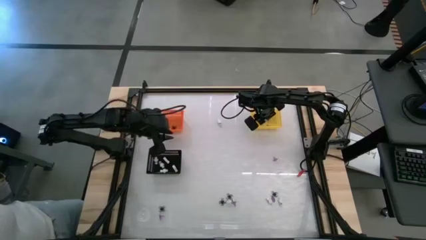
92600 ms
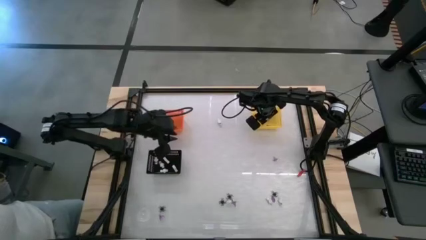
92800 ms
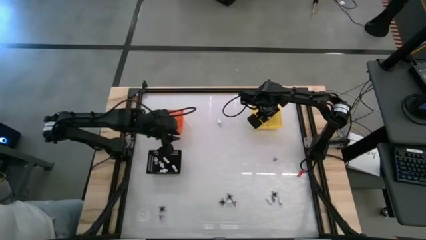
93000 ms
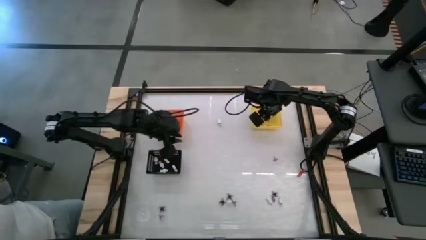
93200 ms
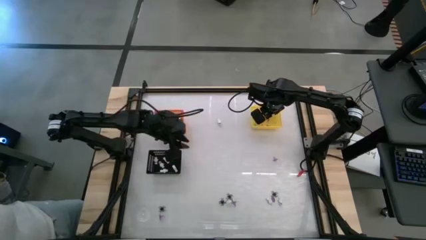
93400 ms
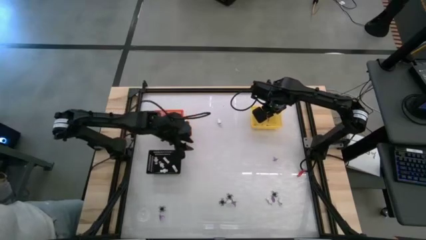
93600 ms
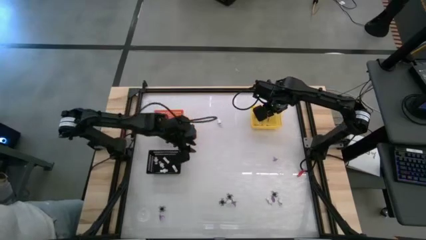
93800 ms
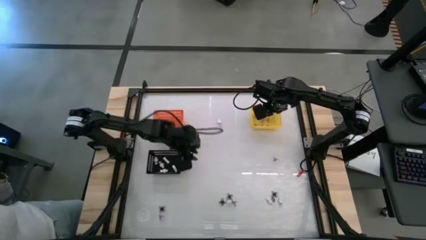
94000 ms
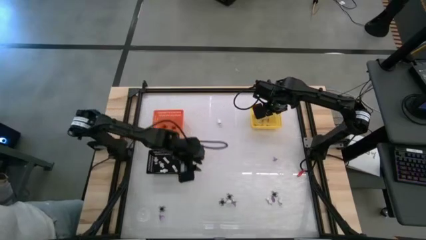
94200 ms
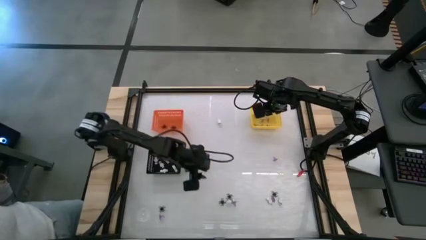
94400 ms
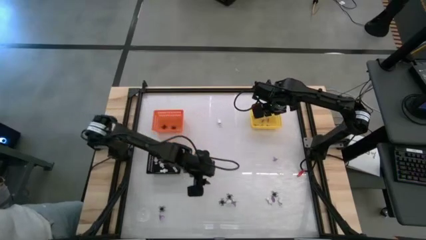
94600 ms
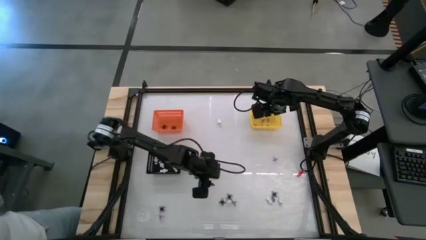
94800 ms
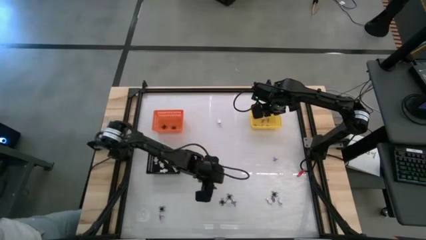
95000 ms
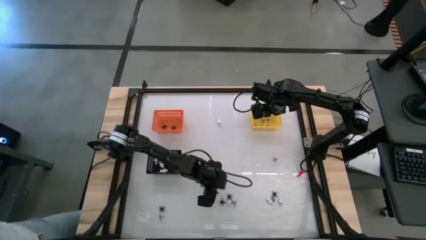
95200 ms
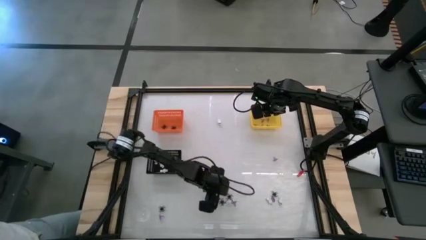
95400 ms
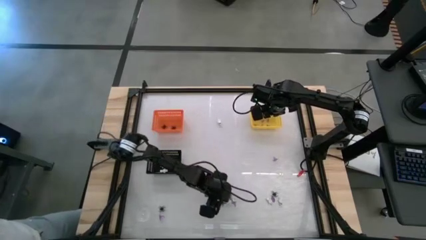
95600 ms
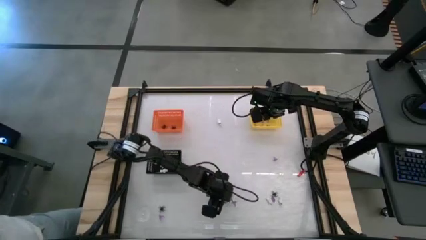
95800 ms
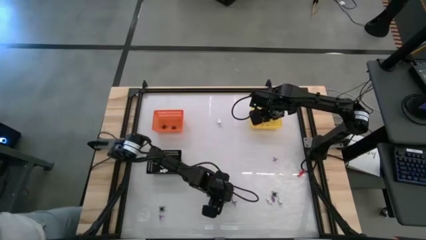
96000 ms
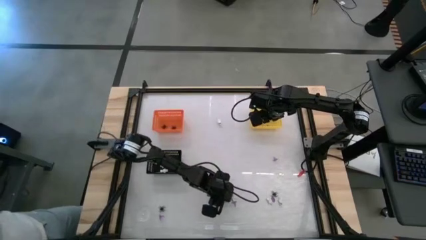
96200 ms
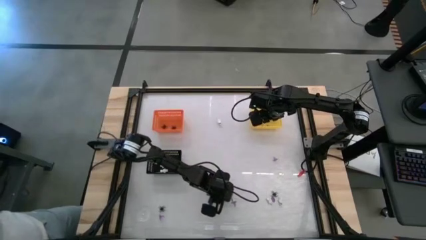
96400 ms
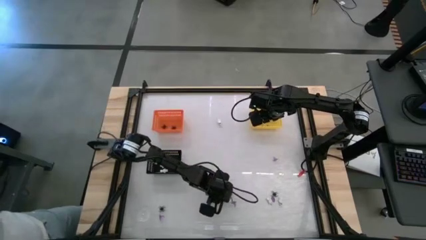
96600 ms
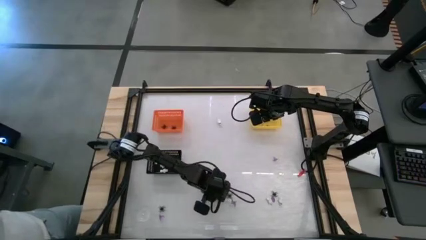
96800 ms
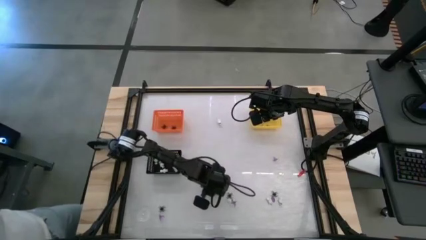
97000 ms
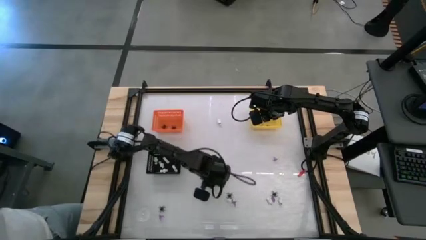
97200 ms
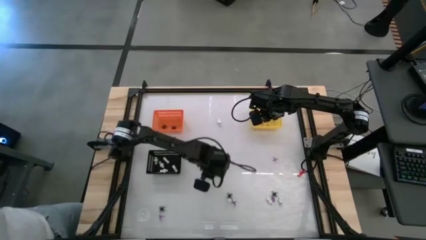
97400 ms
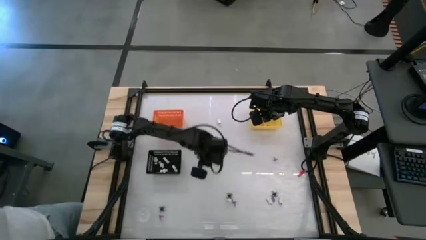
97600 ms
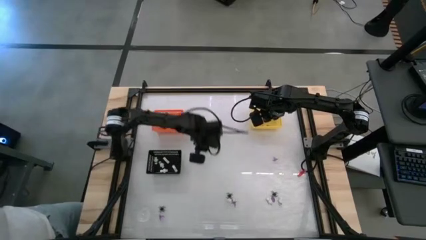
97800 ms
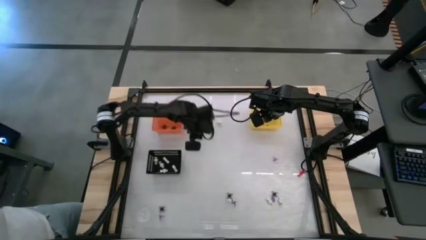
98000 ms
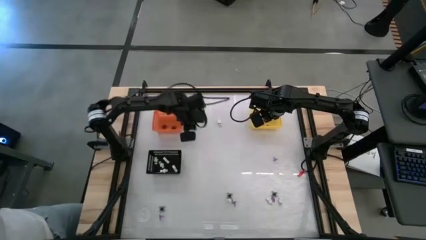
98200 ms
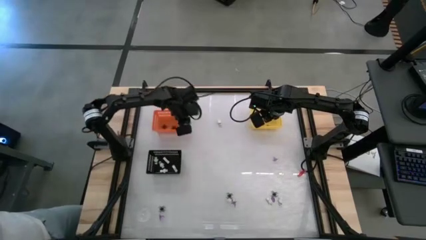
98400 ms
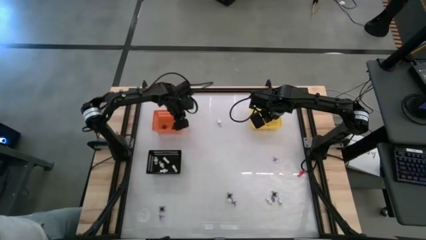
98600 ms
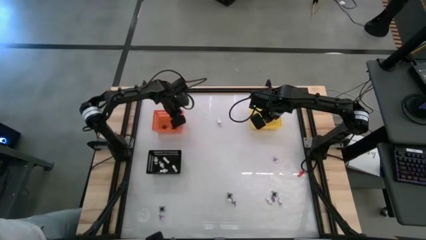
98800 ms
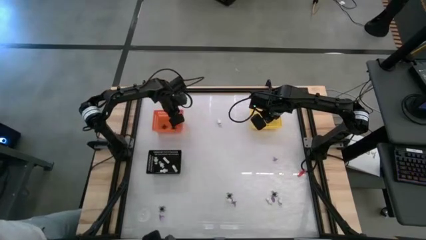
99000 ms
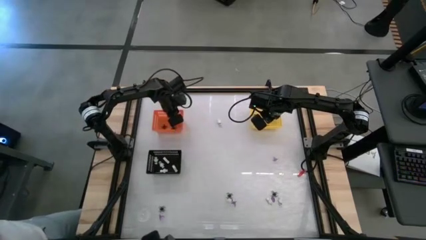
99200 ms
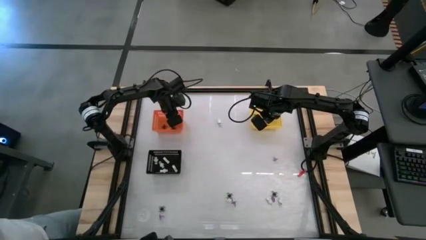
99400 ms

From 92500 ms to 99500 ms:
Task: Sort Halloween decoration
Put the black spider toy into the orange bin

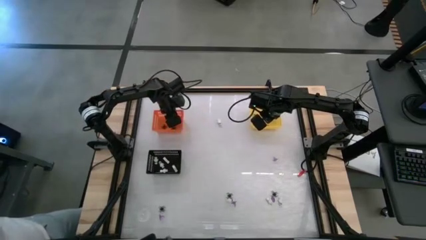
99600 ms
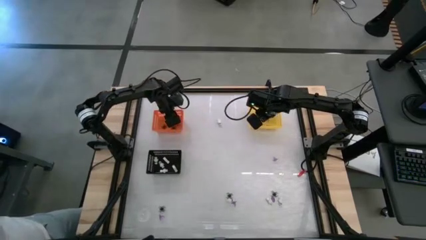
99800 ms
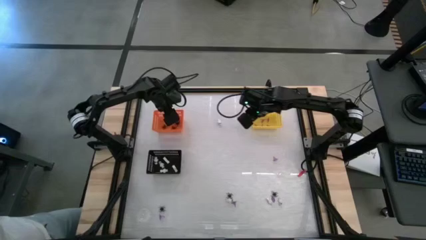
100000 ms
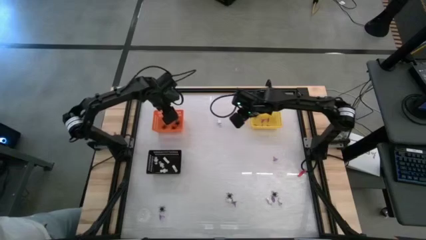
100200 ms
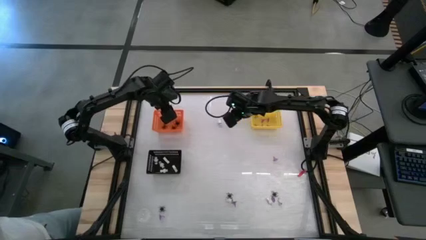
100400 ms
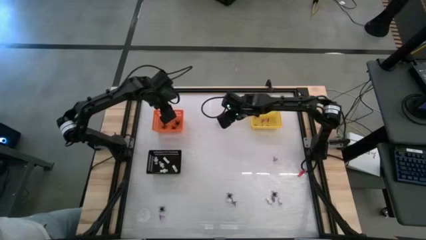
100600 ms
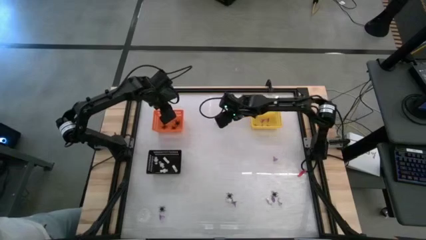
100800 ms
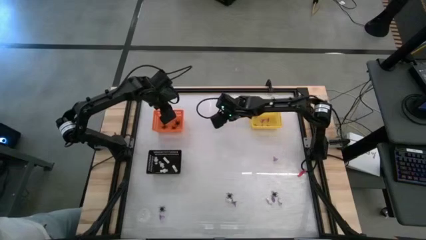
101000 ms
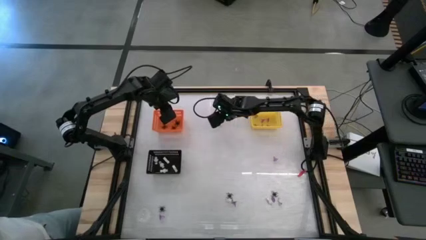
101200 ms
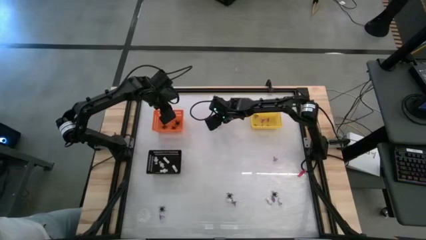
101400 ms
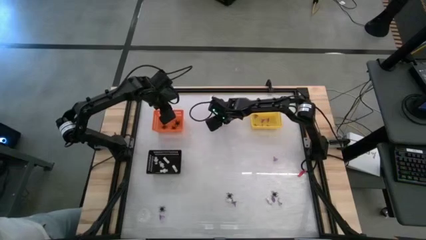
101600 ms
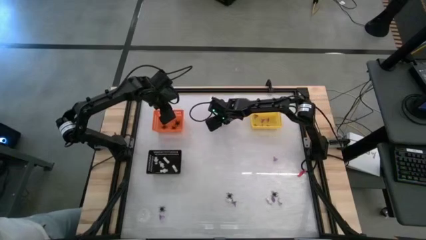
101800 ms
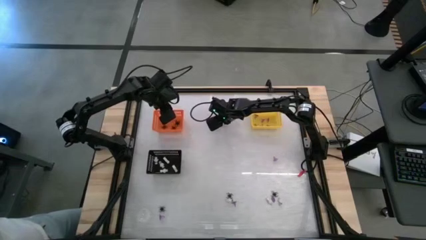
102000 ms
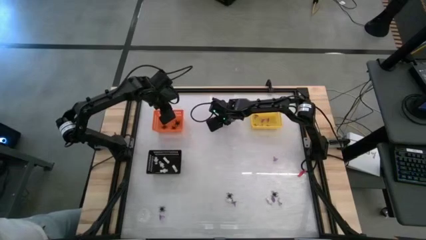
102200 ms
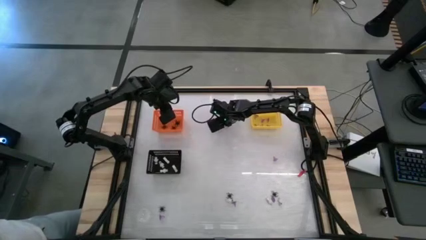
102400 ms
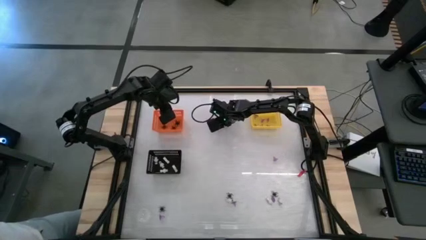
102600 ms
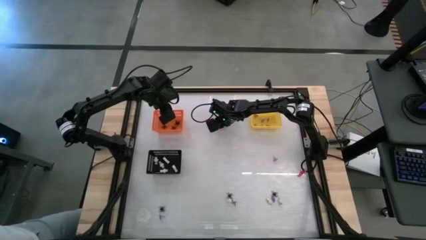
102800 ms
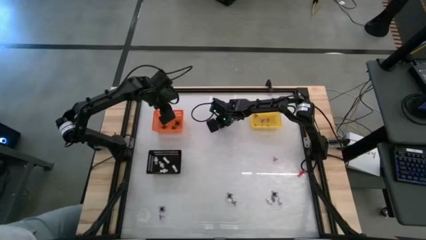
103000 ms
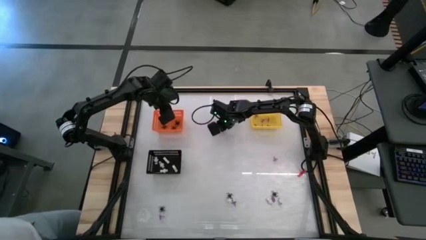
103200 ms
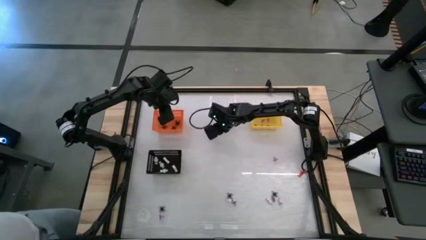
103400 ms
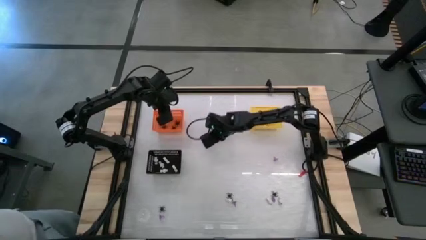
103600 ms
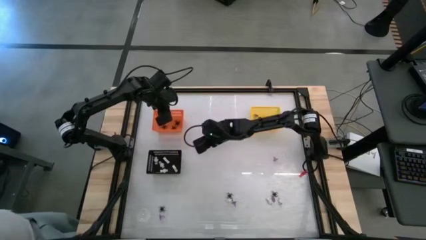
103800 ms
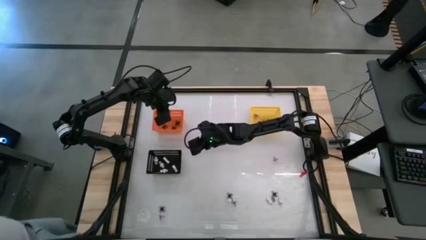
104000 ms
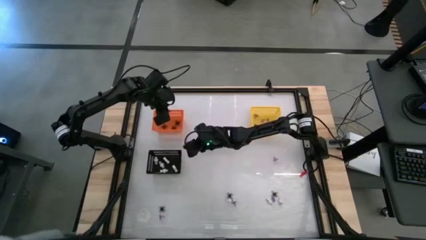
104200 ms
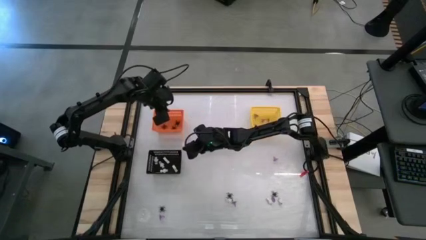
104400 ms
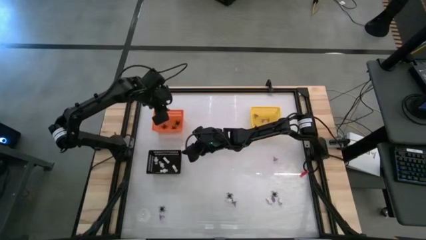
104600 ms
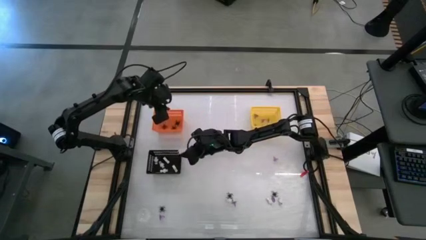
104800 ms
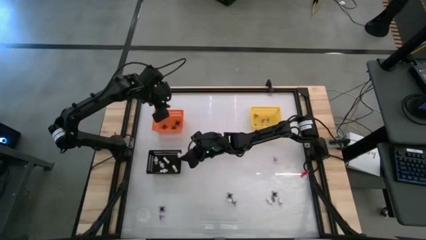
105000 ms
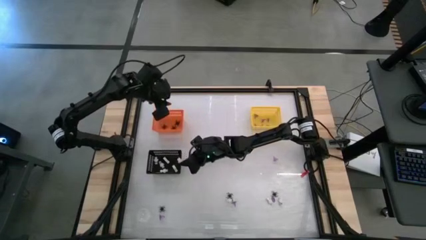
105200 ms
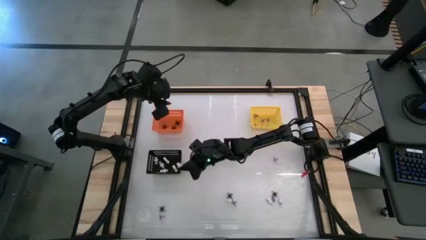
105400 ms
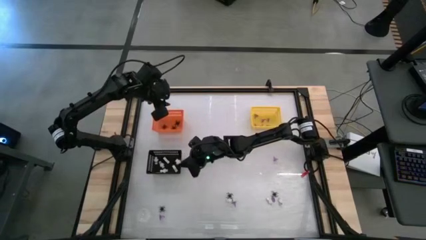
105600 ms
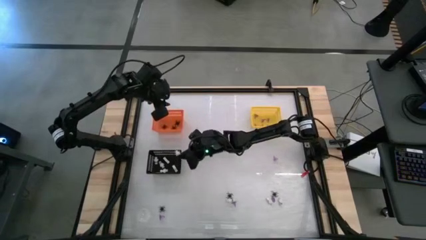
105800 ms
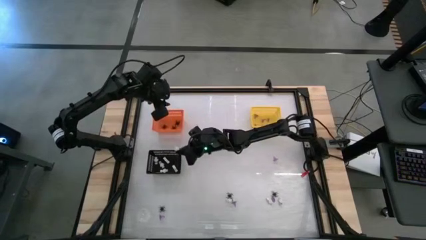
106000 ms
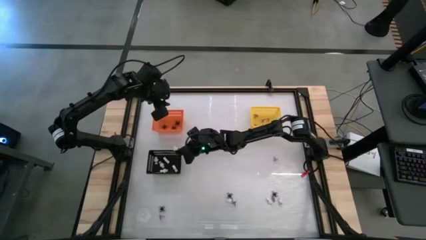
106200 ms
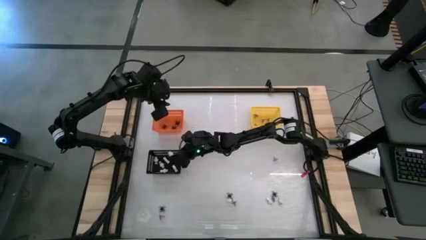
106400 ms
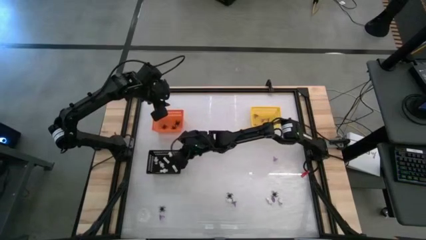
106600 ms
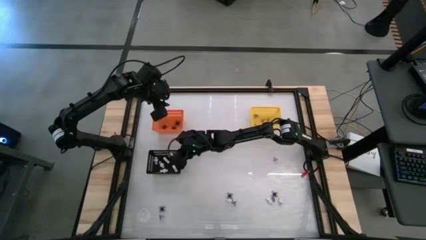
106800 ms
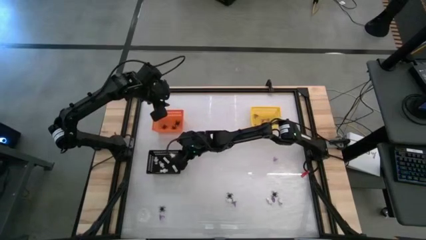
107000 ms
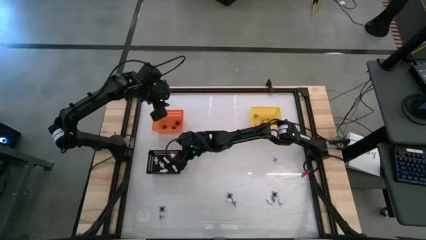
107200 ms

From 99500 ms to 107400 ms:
Put the white skeleton toy into the black bin

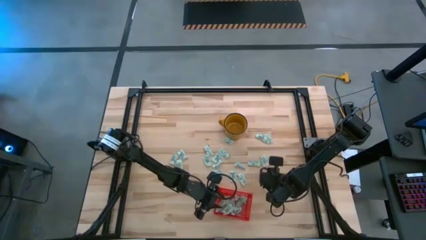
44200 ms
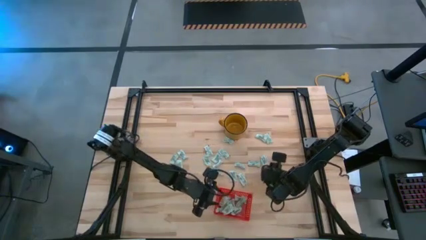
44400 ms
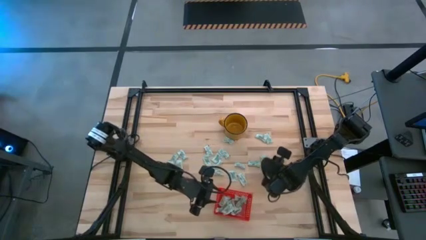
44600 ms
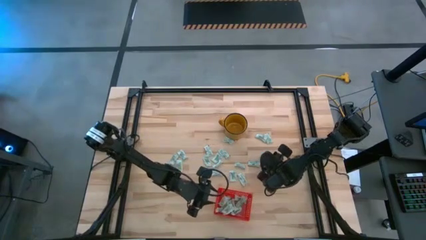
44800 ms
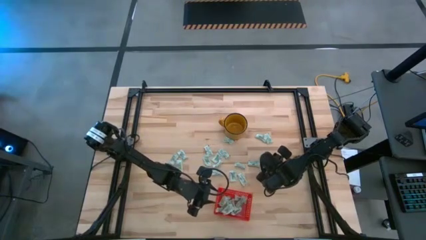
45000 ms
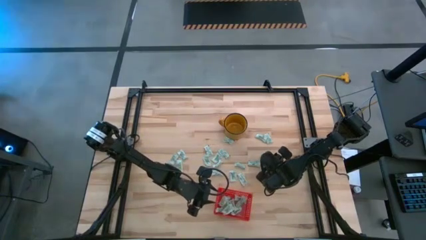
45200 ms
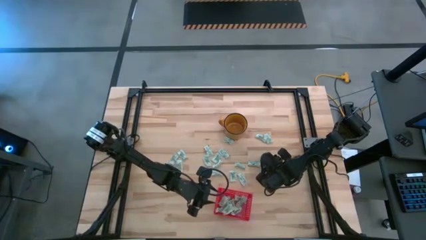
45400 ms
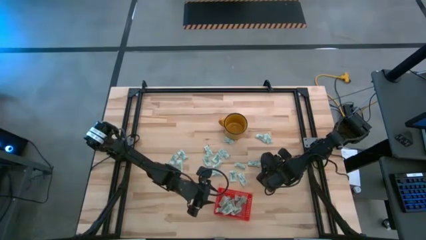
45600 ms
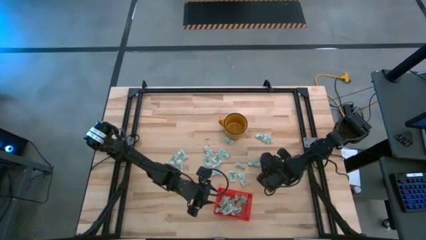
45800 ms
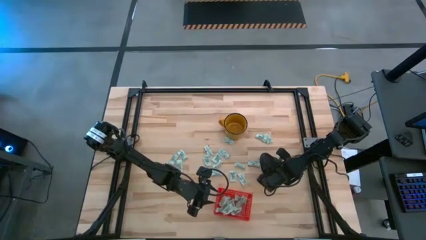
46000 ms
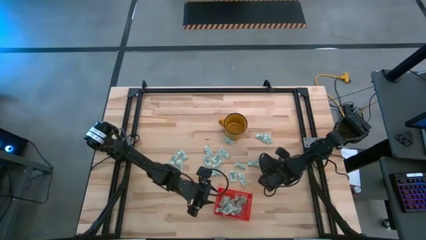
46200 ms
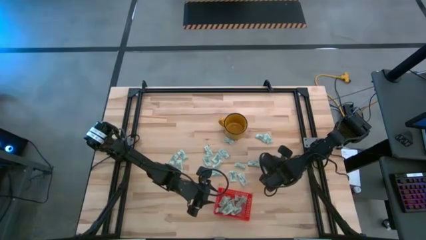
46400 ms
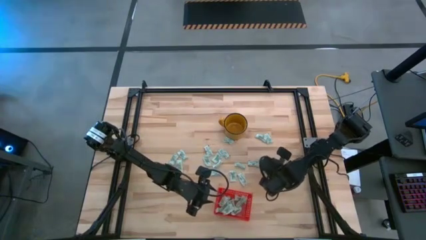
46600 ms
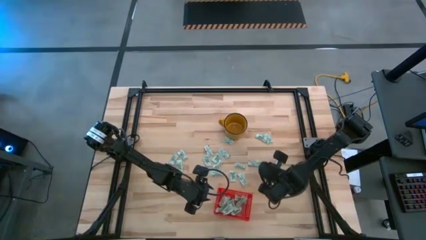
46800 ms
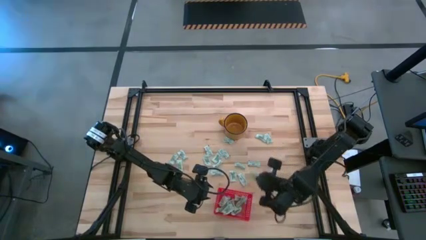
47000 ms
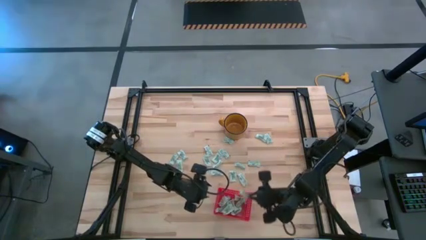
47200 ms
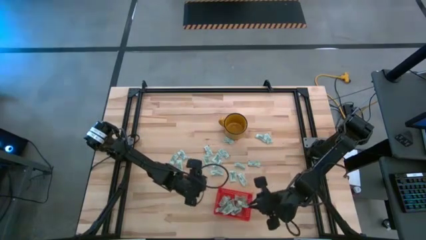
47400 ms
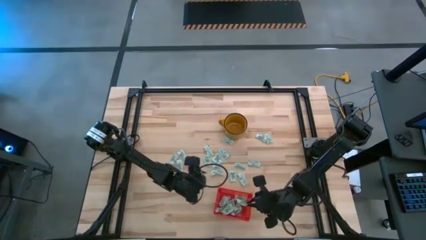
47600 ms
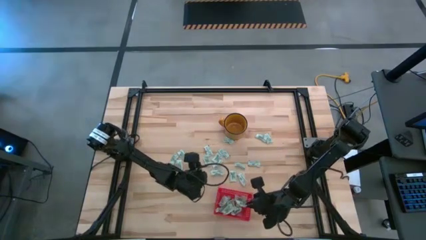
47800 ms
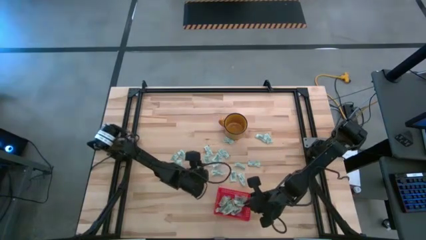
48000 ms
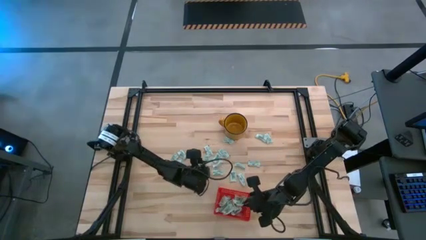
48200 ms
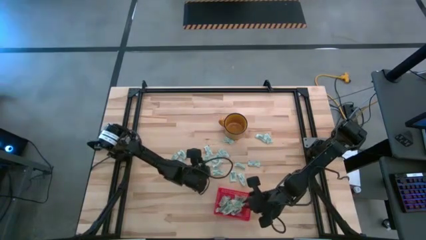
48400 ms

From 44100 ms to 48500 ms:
Task: Pick and place Stevia / Truvia into bins
Put the stevia packet into the bin
